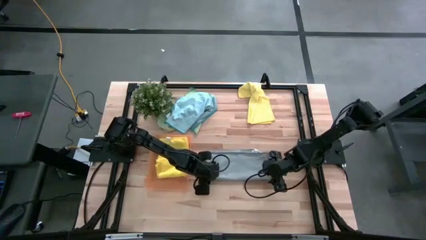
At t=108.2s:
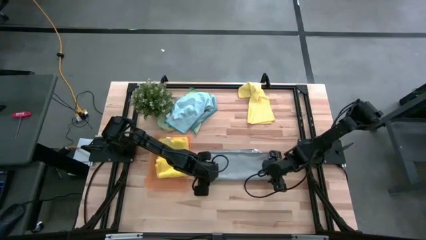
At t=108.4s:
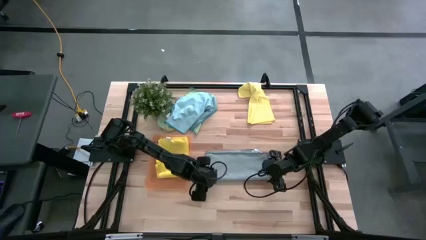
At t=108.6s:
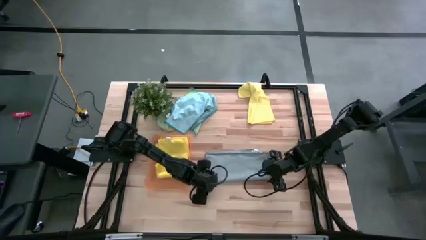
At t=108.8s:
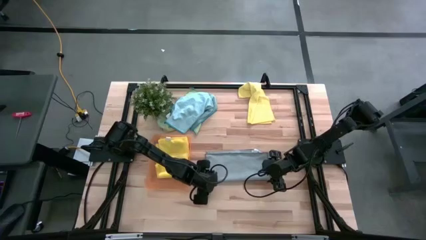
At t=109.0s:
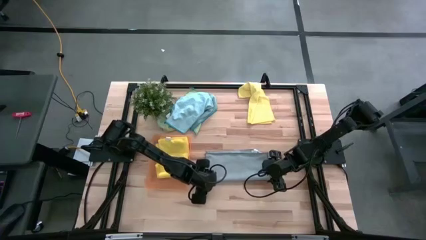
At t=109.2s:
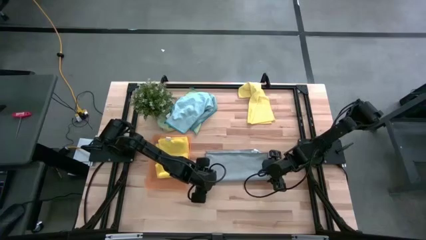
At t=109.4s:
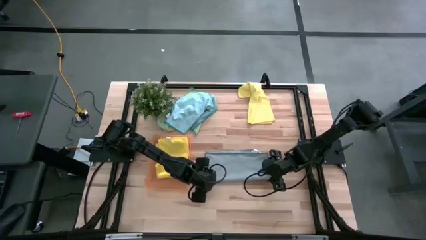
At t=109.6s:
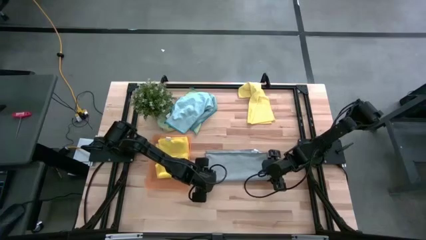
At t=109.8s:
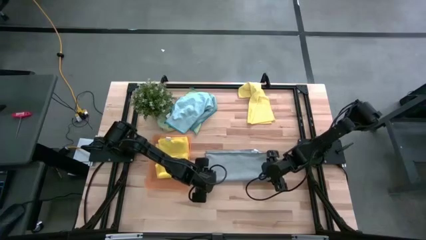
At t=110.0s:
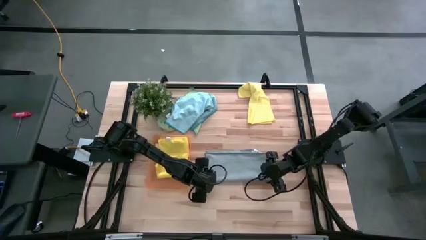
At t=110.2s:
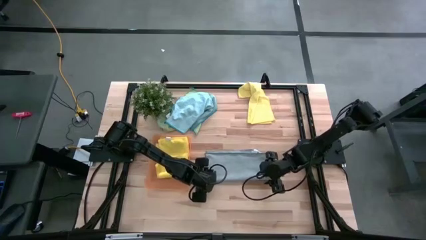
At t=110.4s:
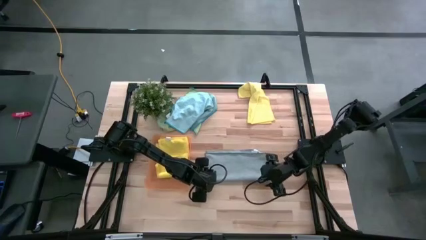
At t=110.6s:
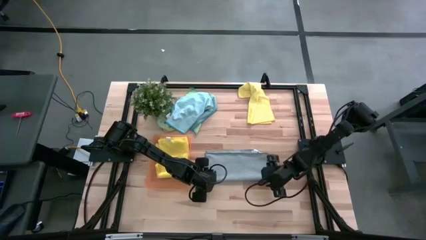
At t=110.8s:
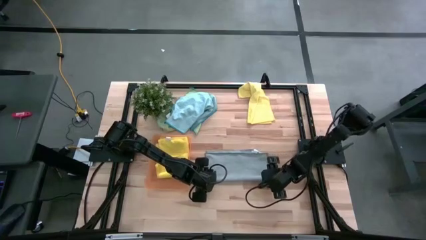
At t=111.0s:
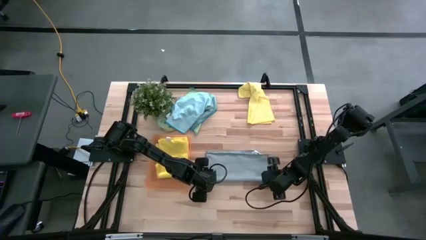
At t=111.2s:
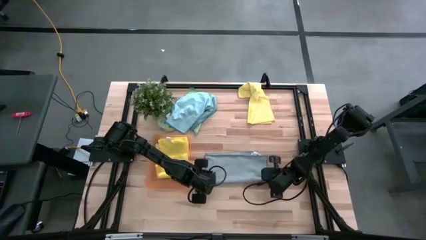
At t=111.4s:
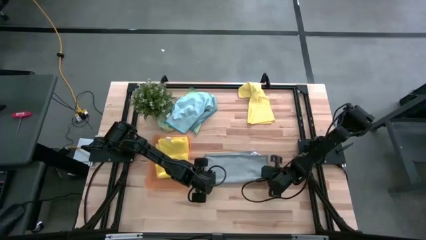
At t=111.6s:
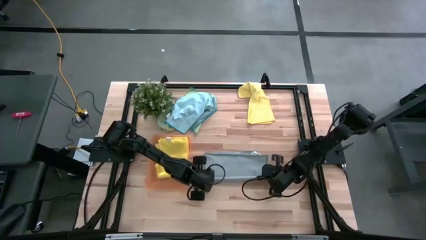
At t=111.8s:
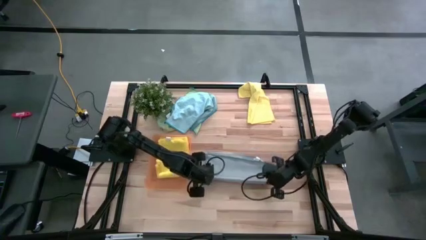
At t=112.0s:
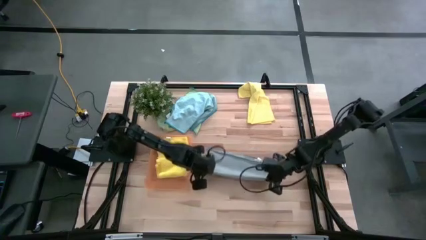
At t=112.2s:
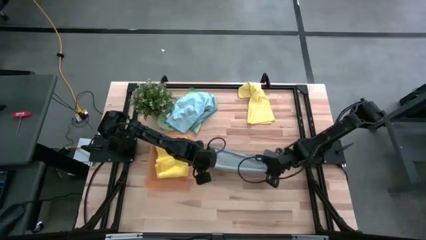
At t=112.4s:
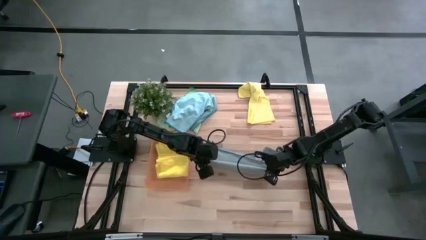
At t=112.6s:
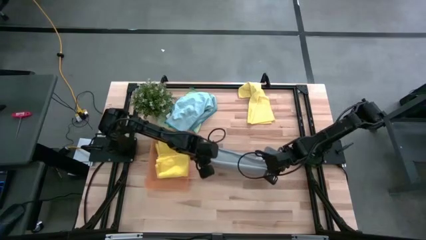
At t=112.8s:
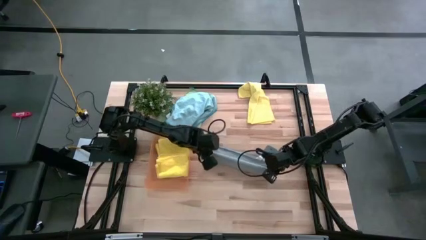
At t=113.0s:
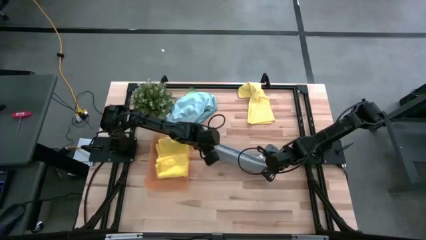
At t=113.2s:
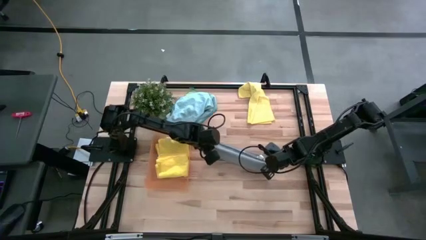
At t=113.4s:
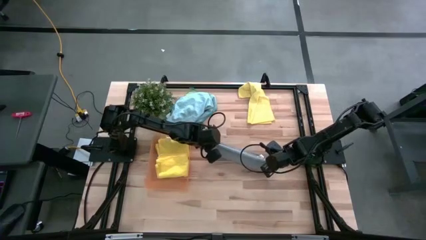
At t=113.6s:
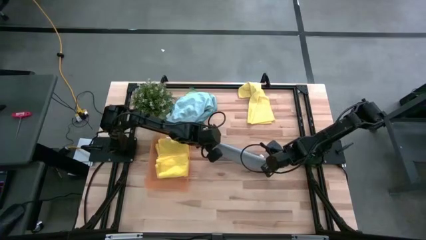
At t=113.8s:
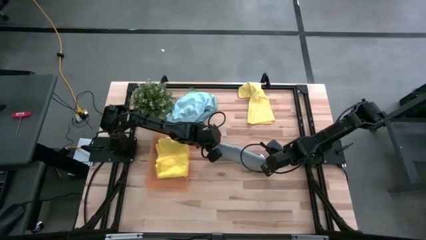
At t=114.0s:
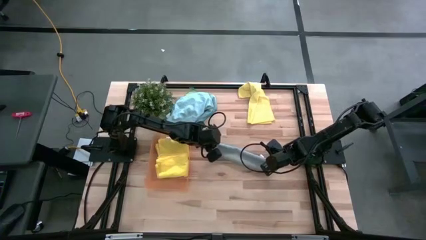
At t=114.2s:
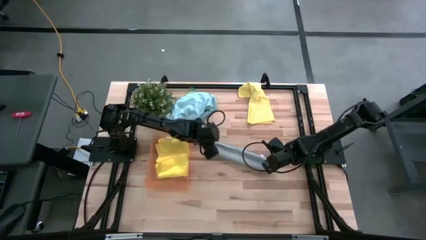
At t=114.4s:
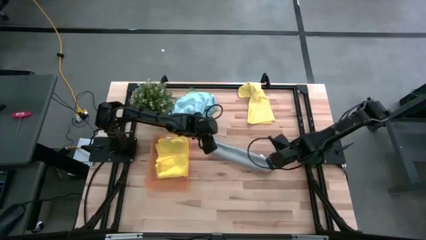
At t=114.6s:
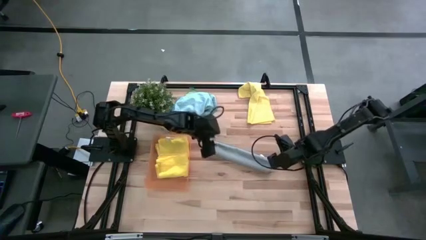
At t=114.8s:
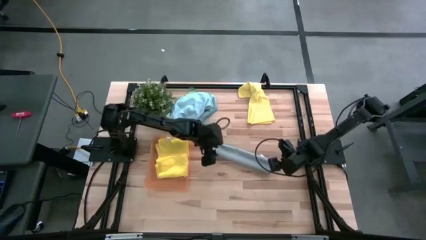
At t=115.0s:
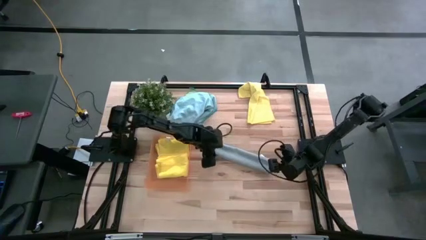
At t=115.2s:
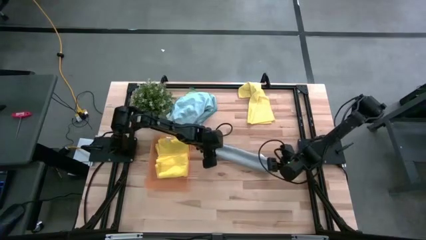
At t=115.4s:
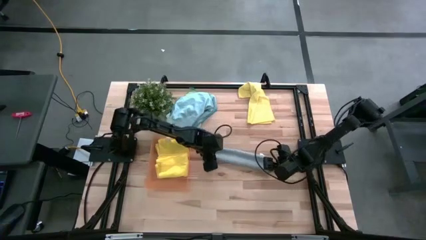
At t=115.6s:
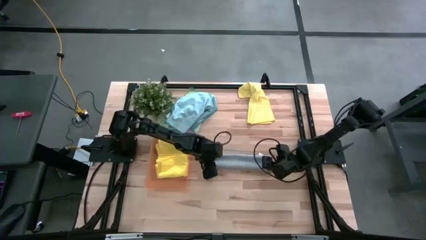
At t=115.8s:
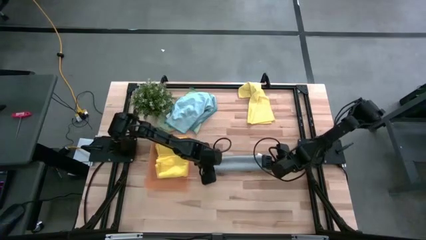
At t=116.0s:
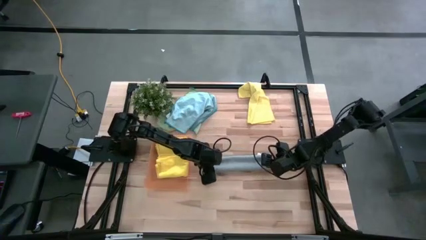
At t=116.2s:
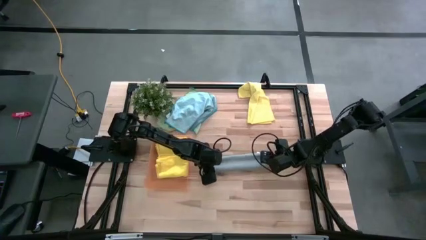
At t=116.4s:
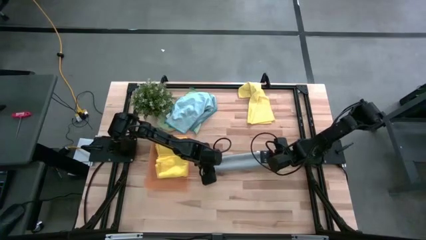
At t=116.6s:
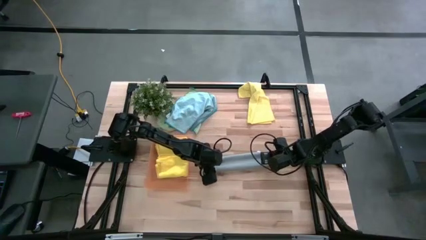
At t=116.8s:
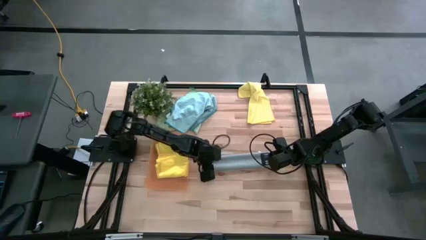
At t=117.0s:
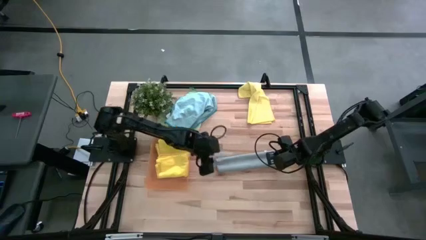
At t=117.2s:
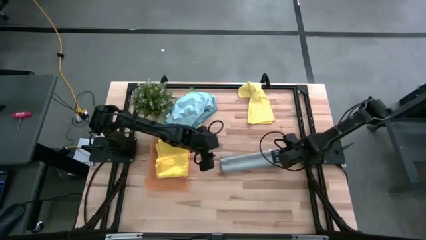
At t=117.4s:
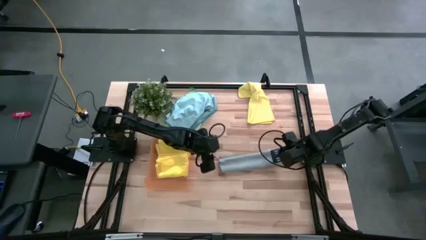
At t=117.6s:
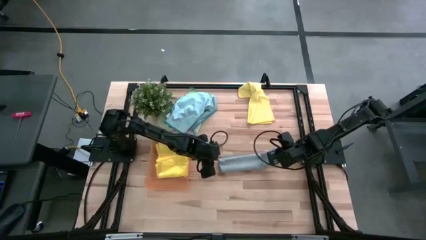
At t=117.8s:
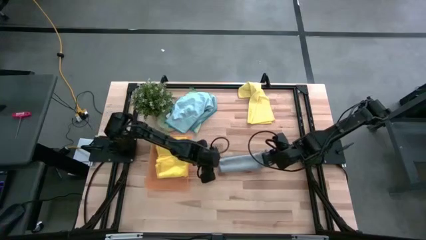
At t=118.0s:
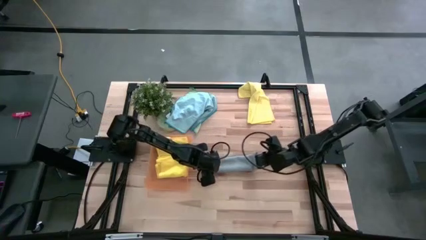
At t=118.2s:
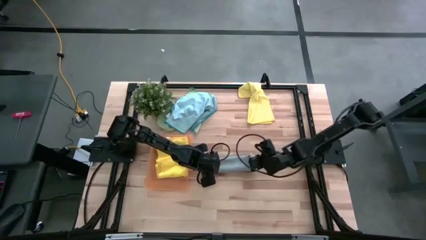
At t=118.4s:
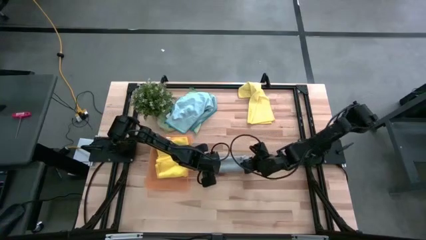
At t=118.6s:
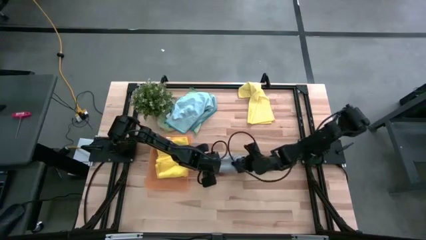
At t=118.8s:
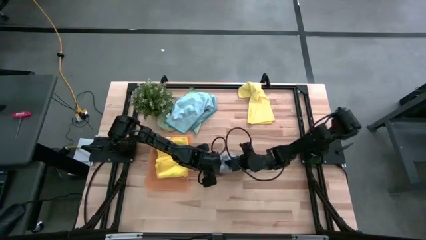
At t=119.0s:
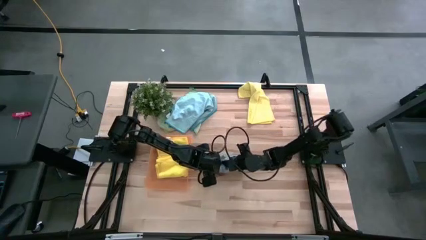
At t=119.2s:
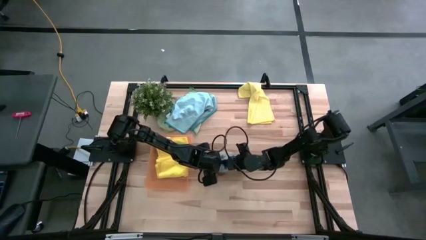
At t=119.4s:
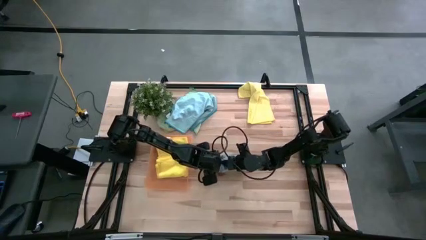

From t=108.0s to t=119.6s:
Task: Fold microfiber towels
Fold the gray microfiber towel
